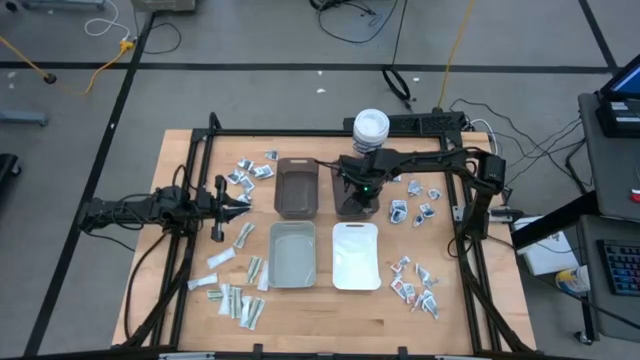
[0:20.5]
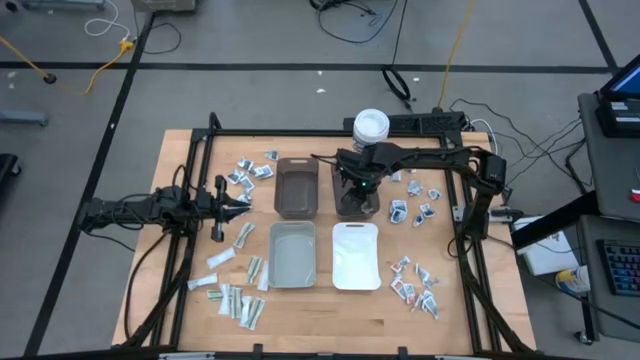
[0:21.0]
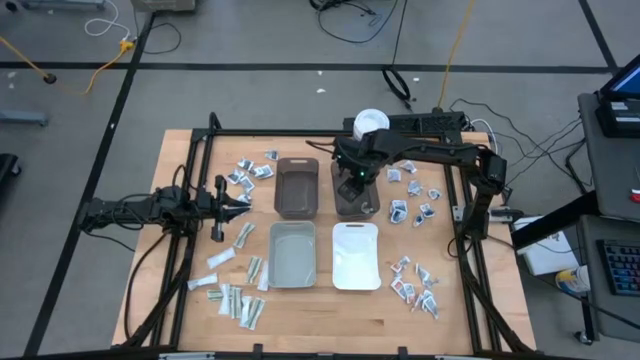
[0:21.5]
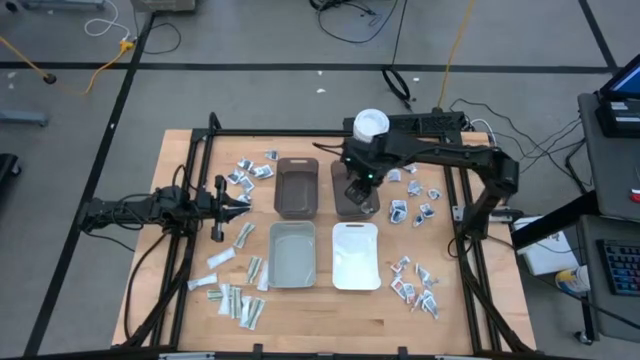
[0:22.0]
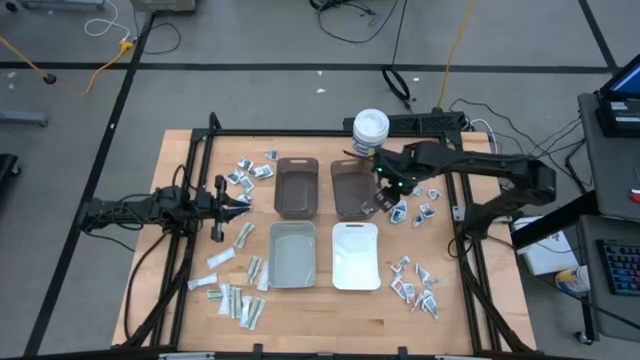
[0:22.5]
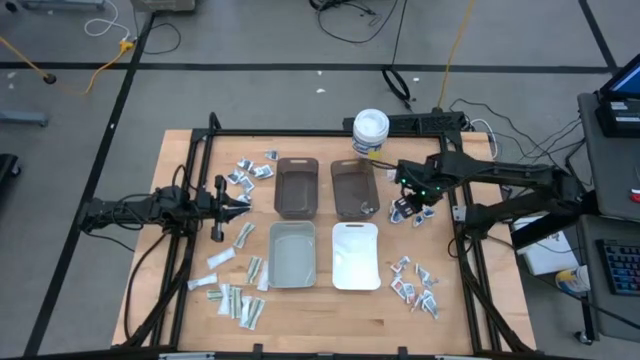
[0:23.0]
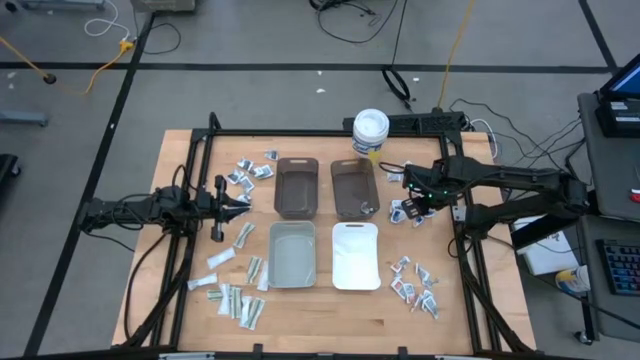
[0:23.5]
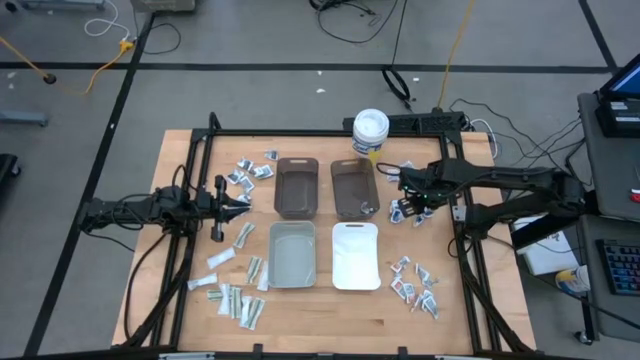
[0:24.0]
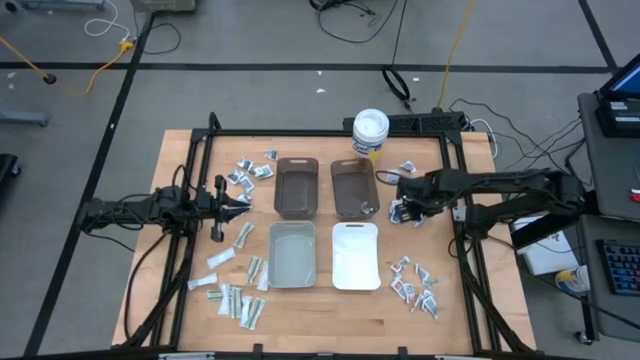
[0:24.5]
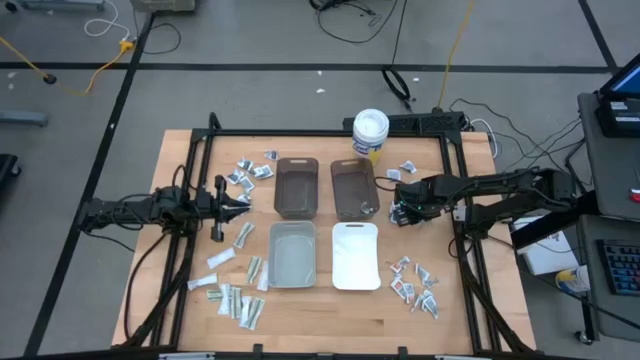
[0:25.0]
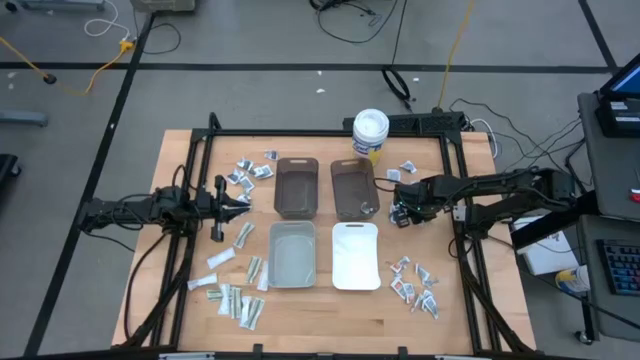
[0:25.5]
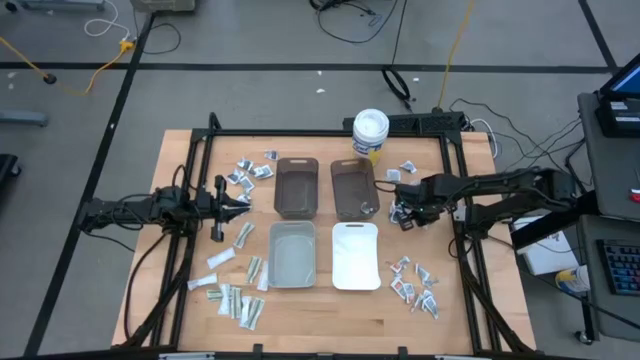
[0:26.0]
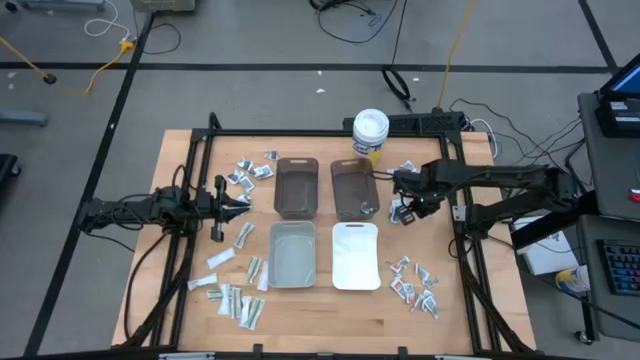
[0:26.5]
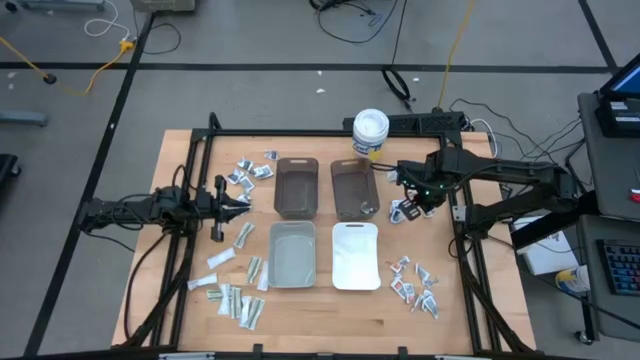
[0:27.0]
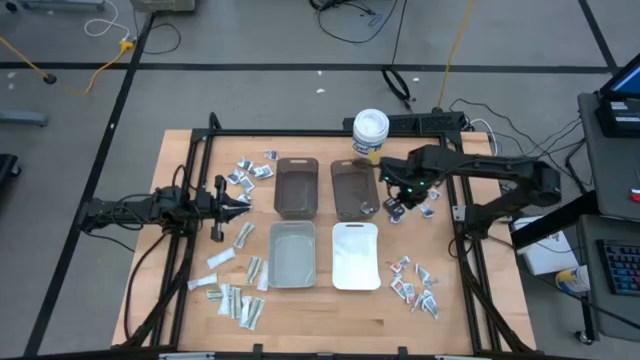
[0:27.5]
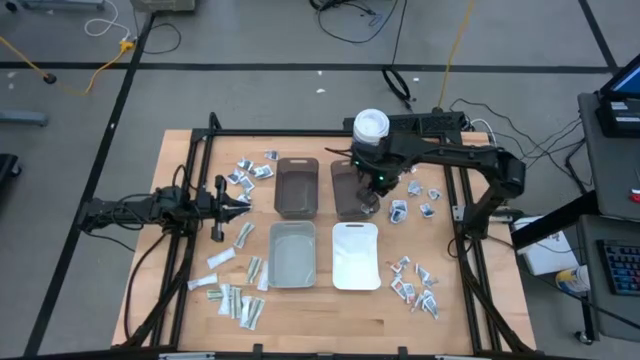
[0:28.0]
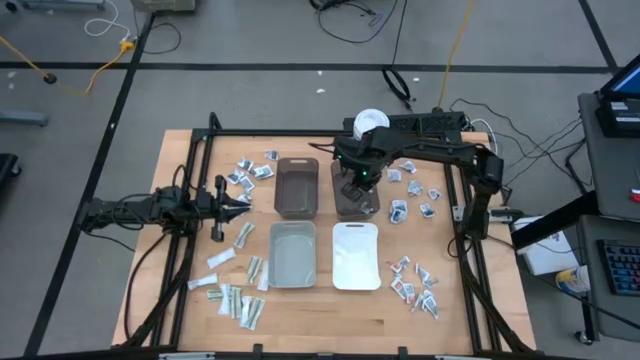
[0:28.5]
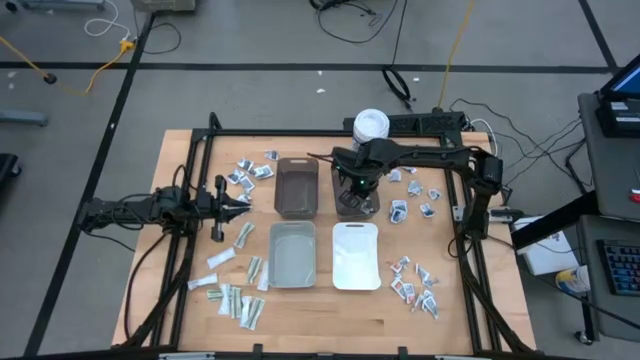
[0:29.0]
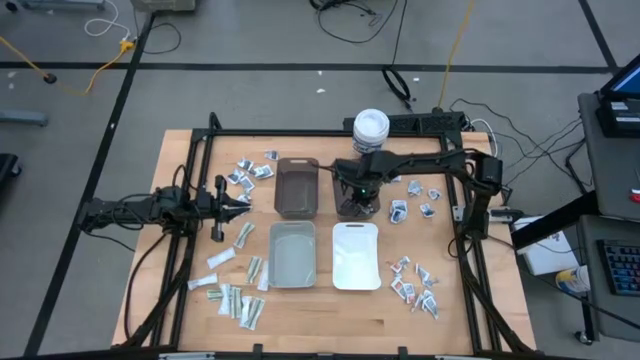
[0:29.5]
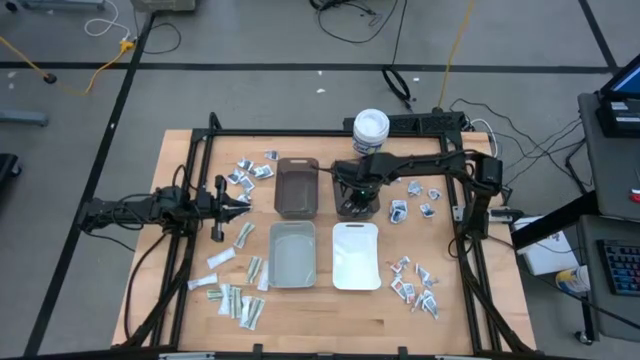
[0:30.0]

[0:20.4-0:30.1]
Task: Pick & Place First Aid Supplies
Put the blue pad into the right black bin

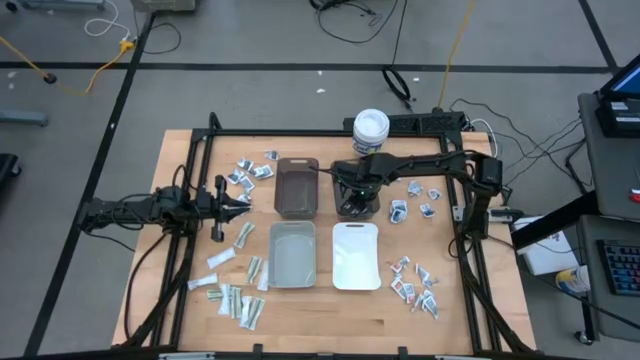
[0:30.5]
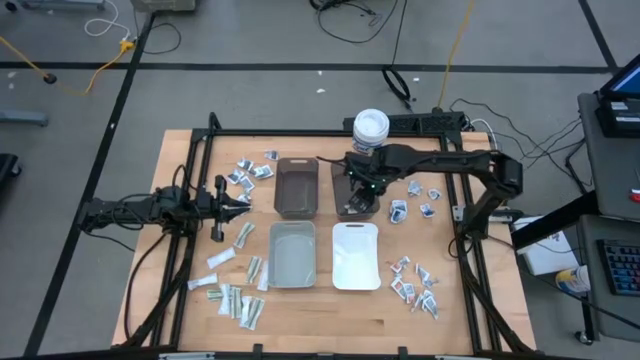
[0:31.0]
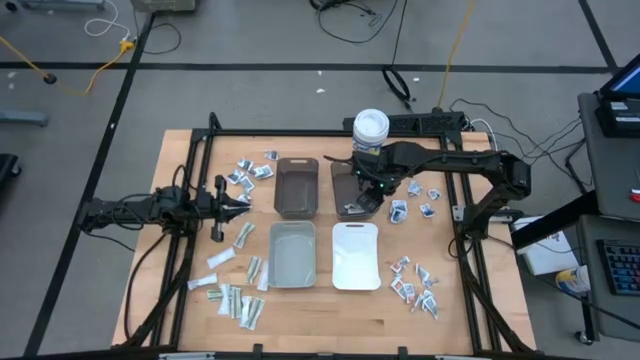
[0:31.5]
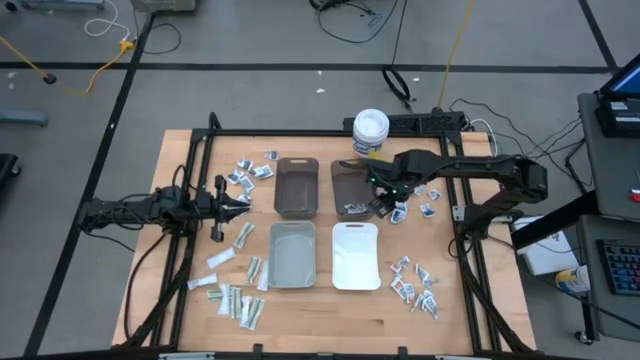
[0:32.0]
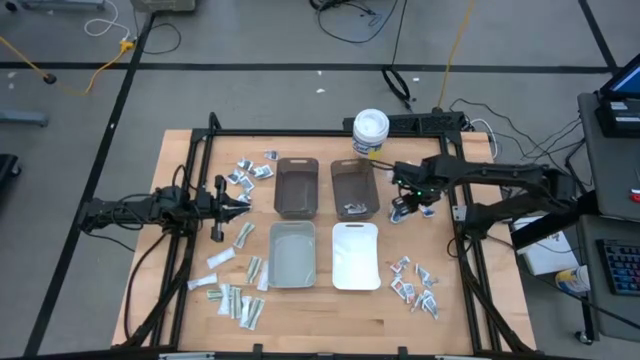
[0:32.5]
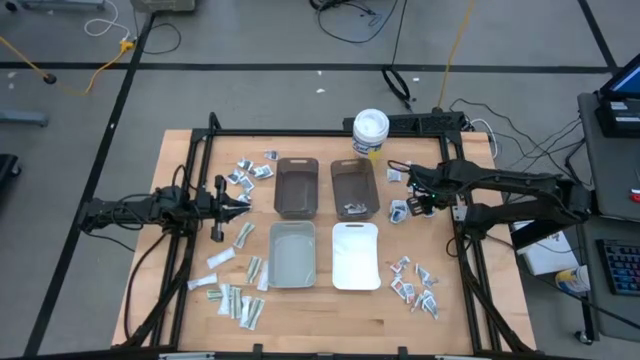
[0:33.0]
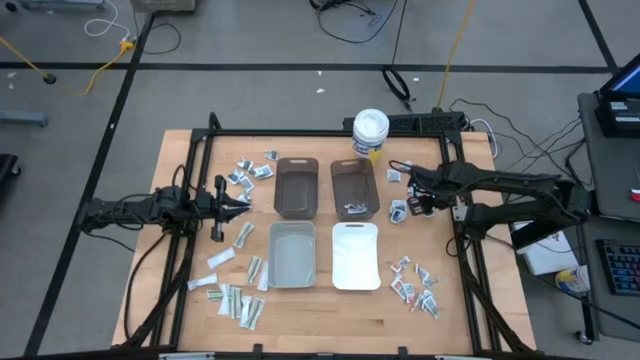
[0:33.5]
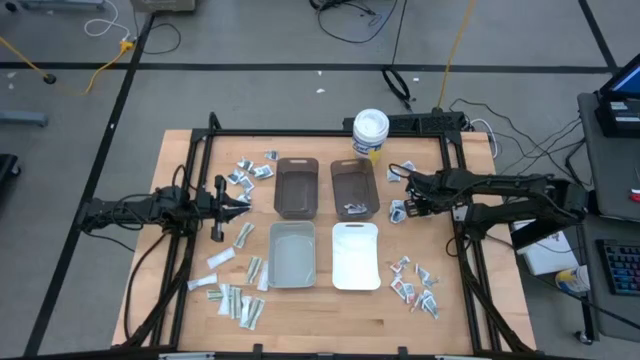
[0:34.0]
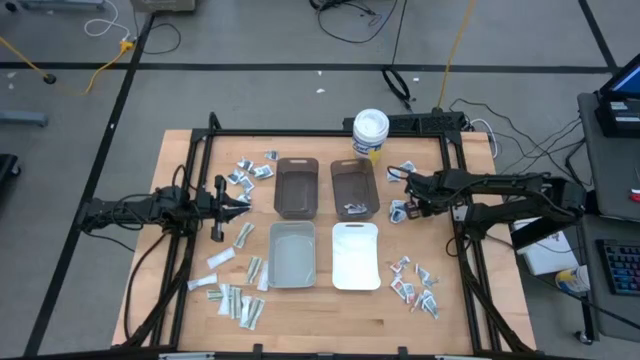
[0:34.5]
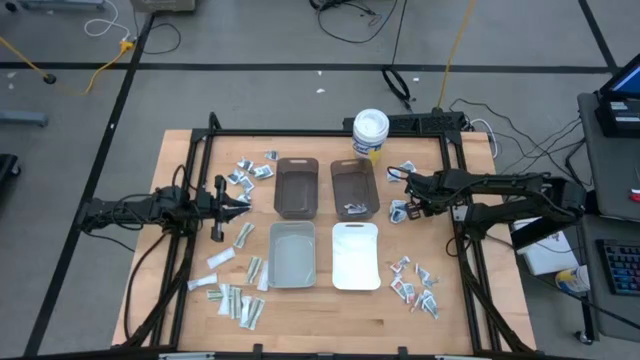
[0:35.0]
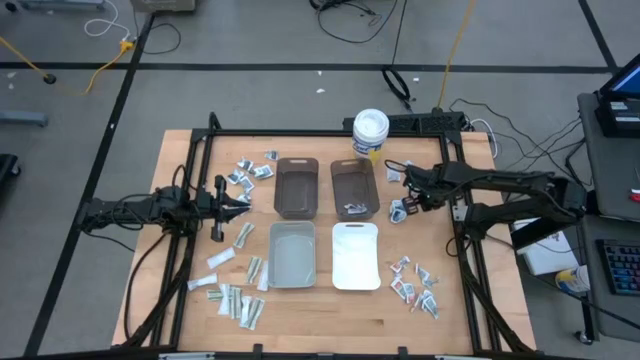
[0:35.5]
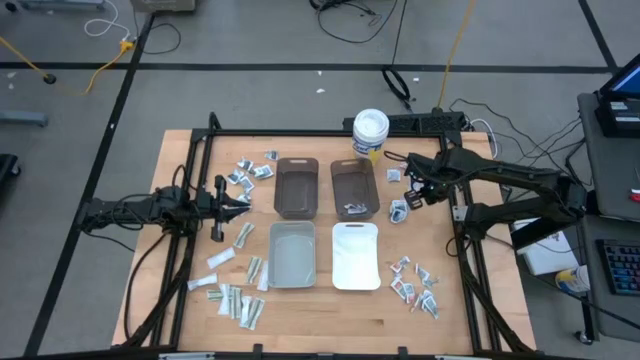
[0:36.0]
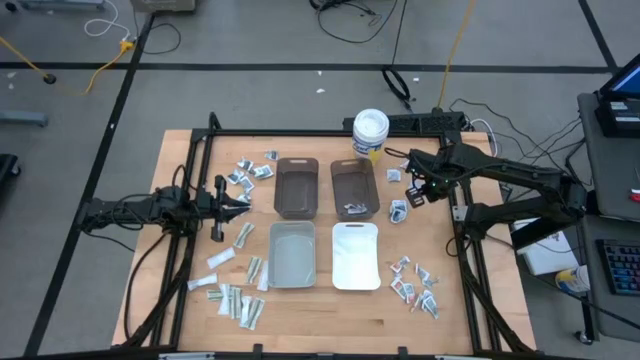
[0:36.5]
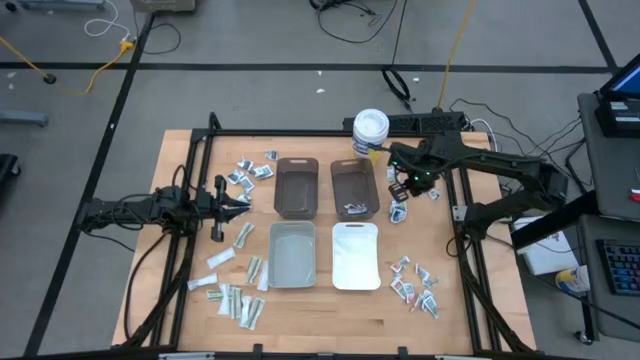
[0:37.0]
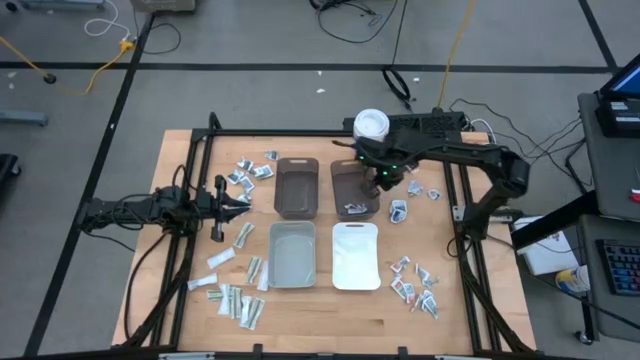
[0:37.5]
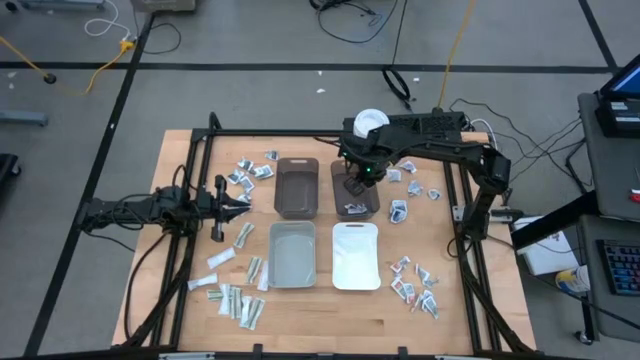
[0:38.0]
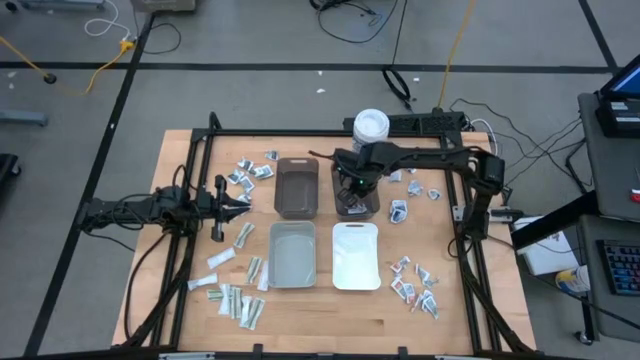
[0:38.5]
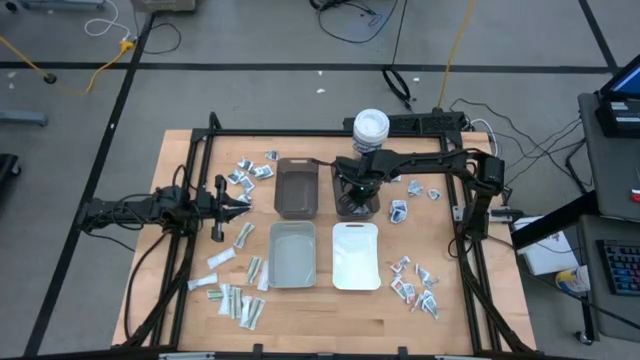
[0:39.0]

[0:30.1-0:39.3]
Put the blue pad into the right black bin

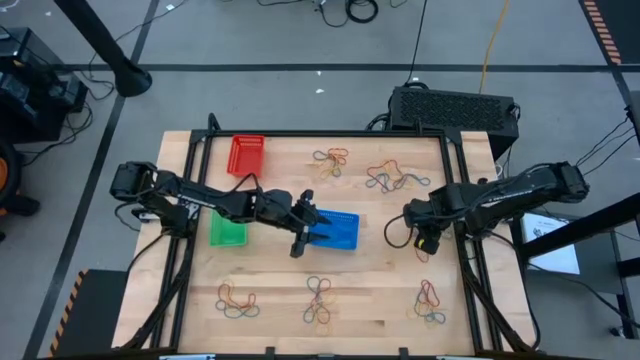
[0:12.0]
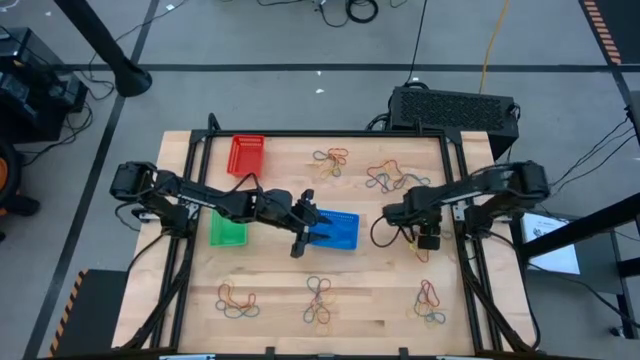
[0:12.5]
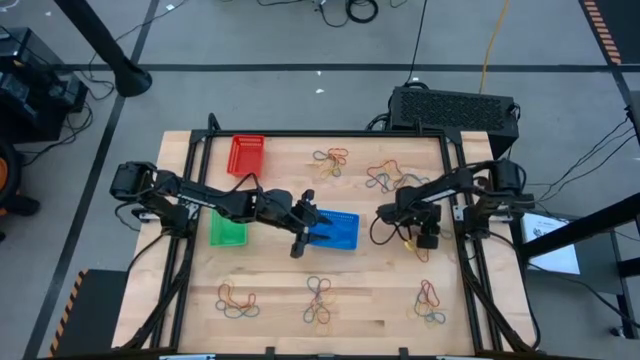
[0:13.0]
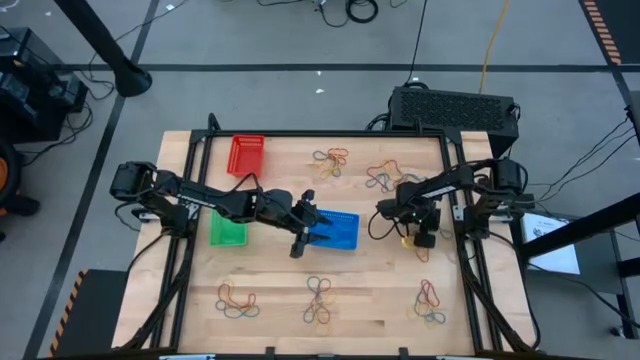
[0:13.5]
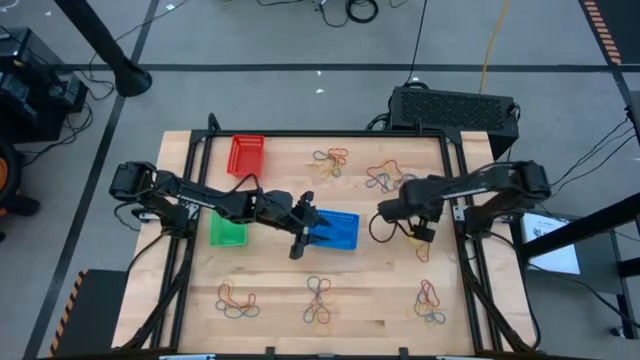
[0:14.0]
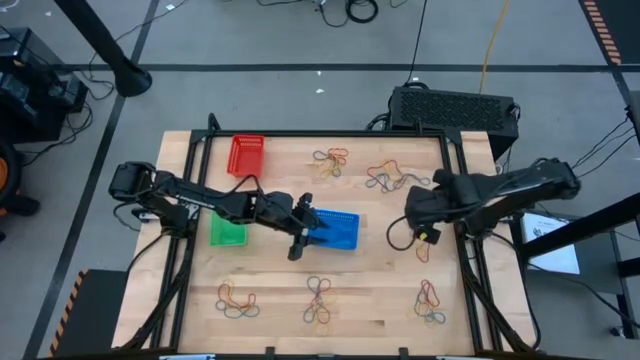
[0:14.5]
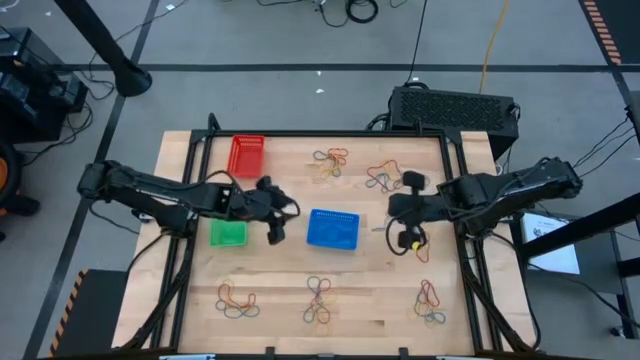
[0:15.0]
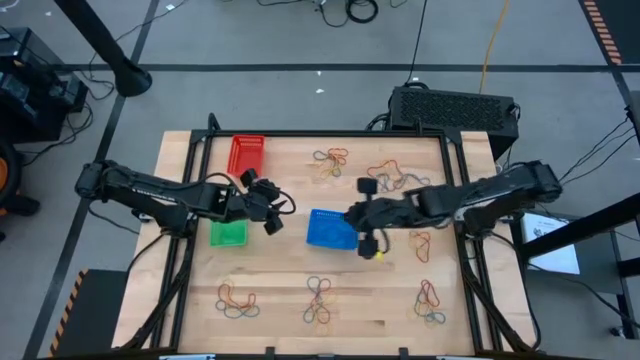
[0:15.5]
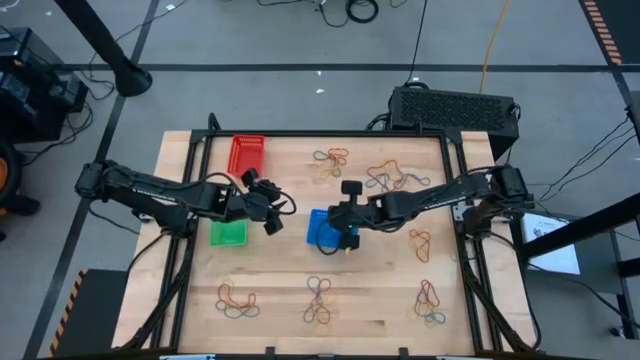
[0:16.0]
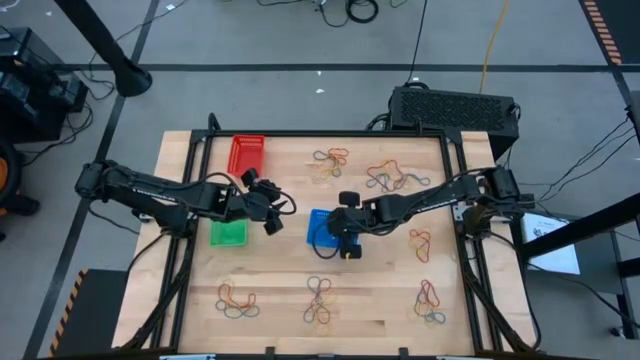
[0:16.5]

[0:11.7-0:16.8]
Task: Sort rubber bands into baskets
Put the blue rubber band into the blue bin
